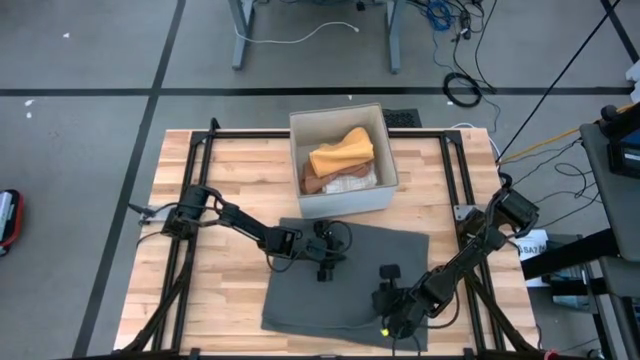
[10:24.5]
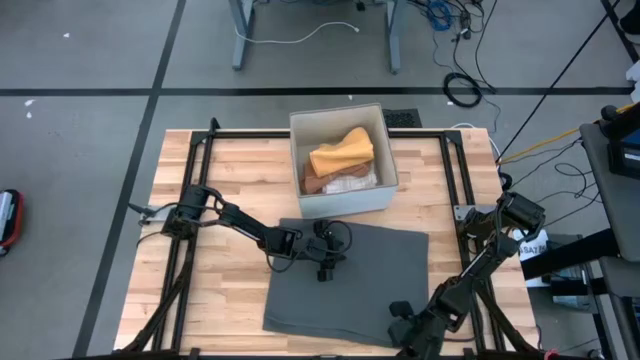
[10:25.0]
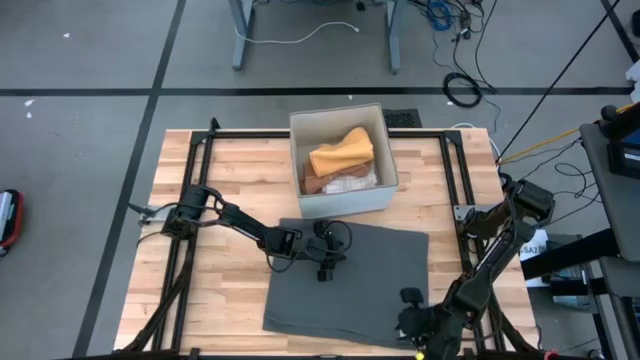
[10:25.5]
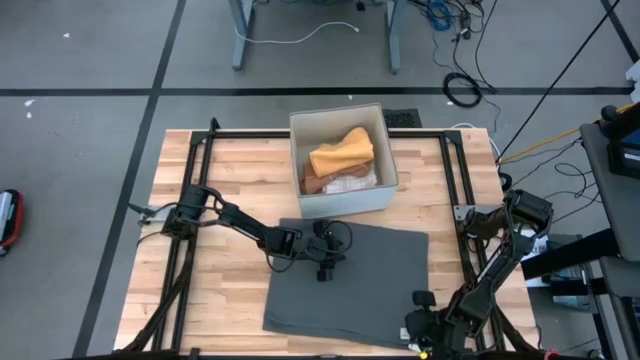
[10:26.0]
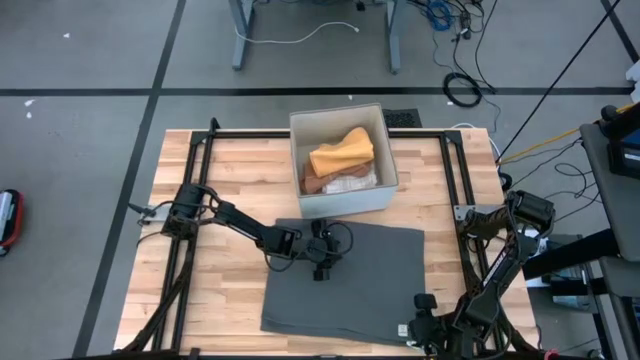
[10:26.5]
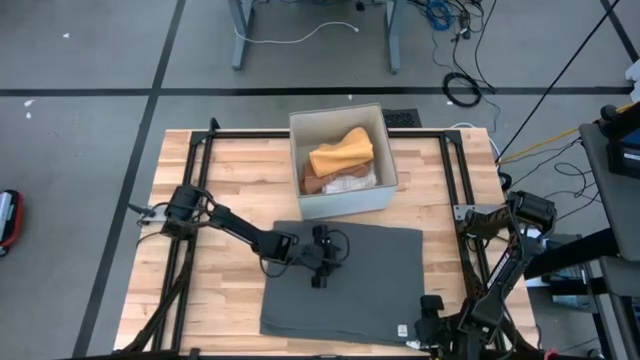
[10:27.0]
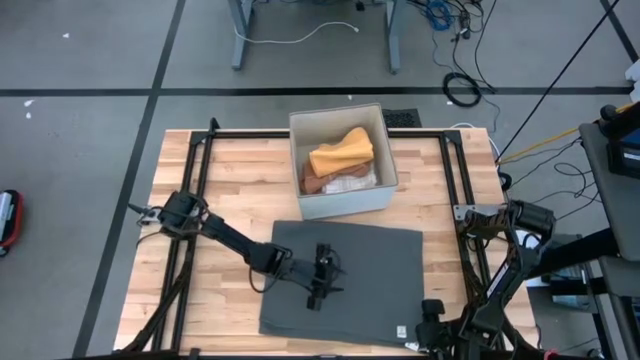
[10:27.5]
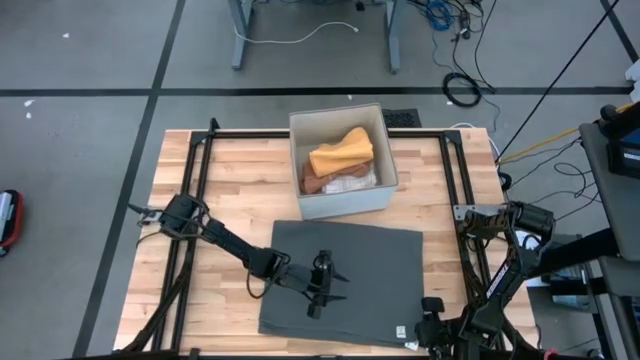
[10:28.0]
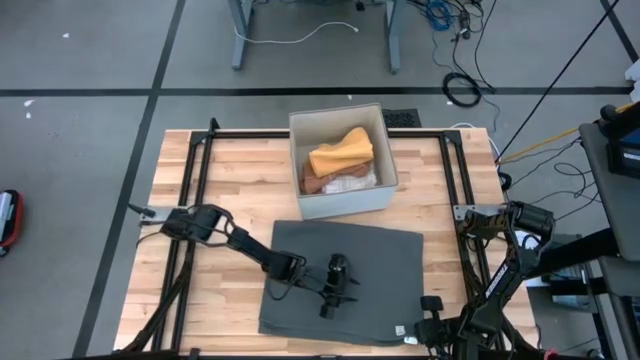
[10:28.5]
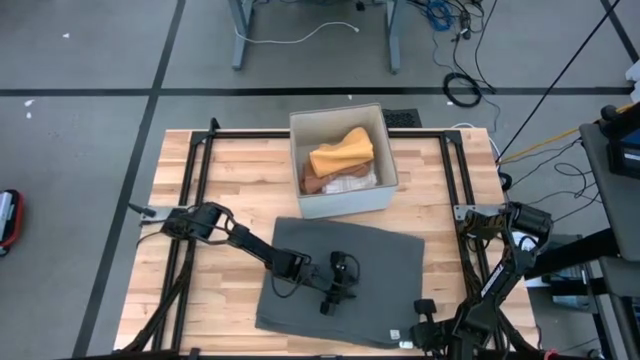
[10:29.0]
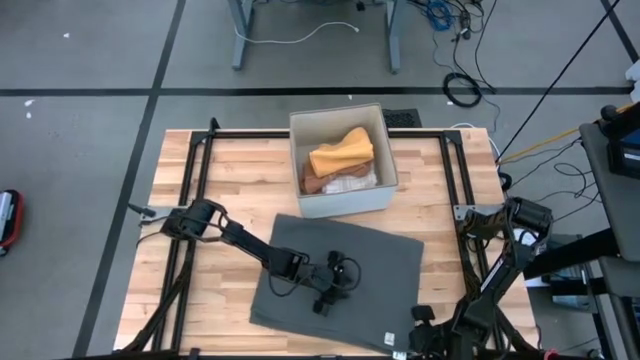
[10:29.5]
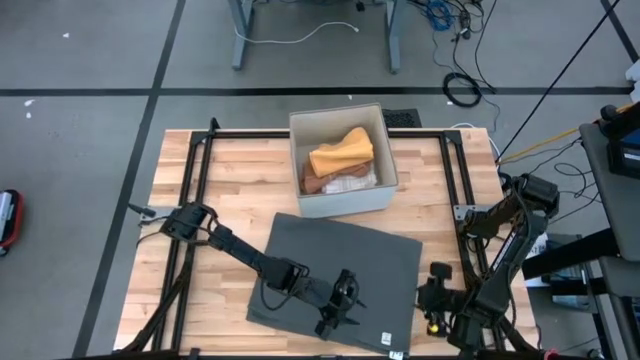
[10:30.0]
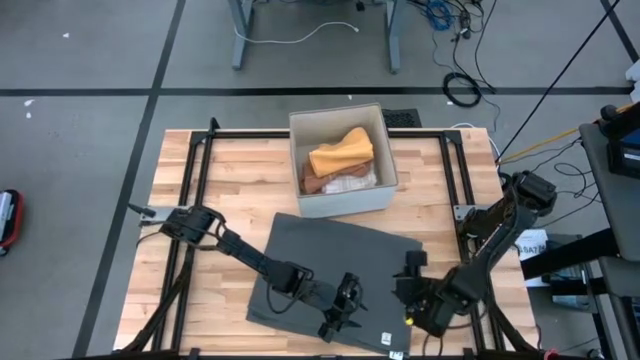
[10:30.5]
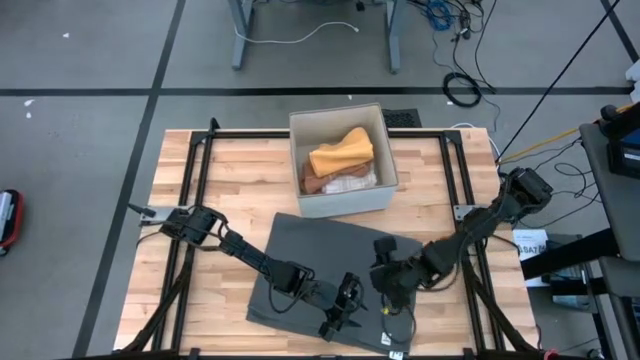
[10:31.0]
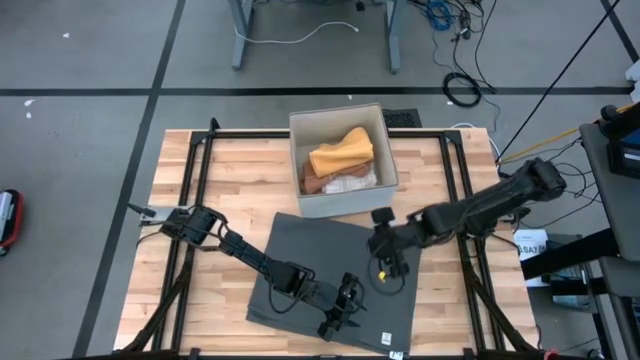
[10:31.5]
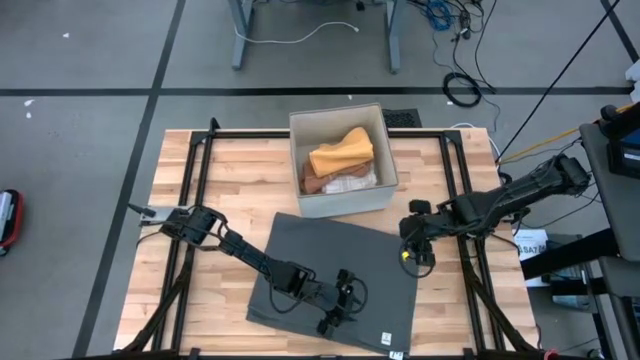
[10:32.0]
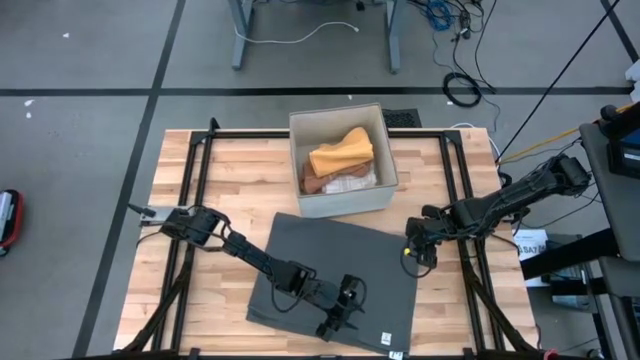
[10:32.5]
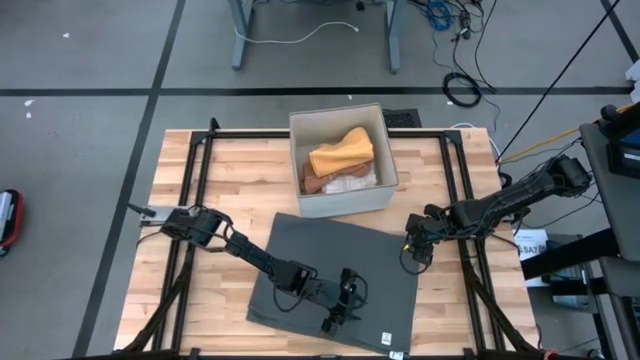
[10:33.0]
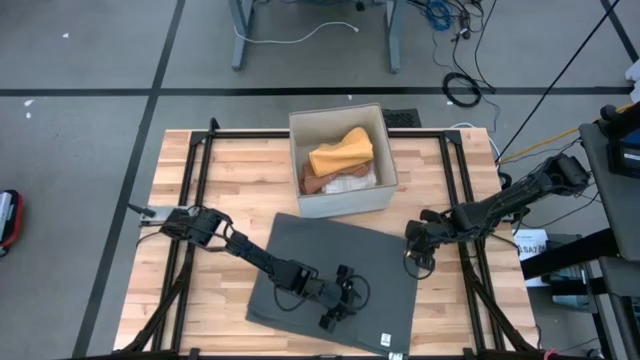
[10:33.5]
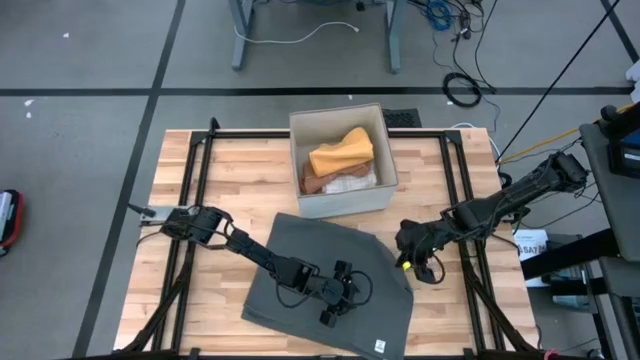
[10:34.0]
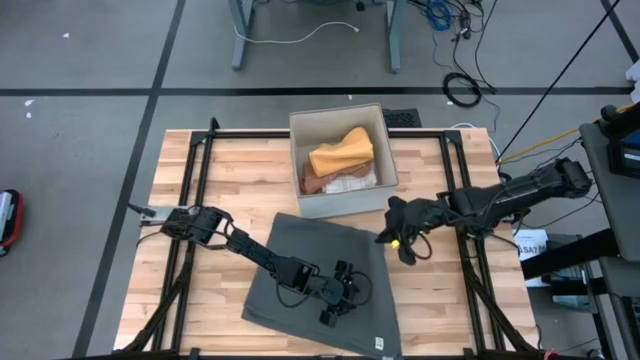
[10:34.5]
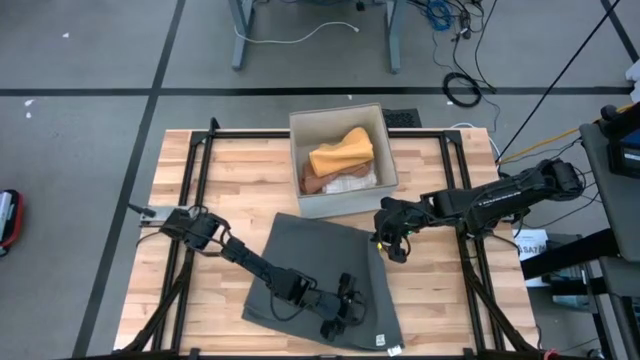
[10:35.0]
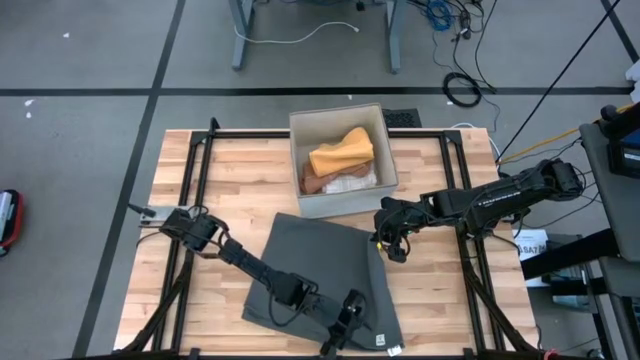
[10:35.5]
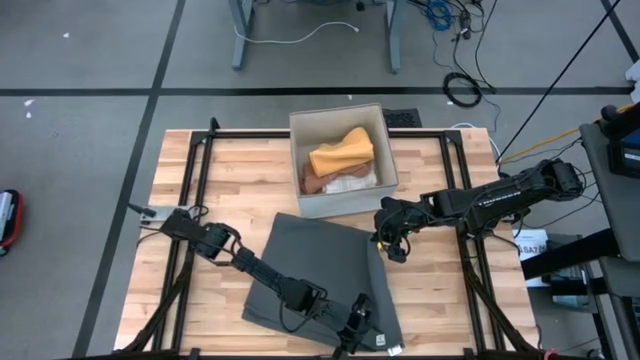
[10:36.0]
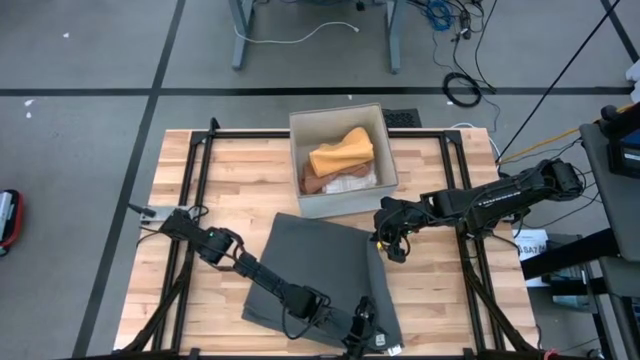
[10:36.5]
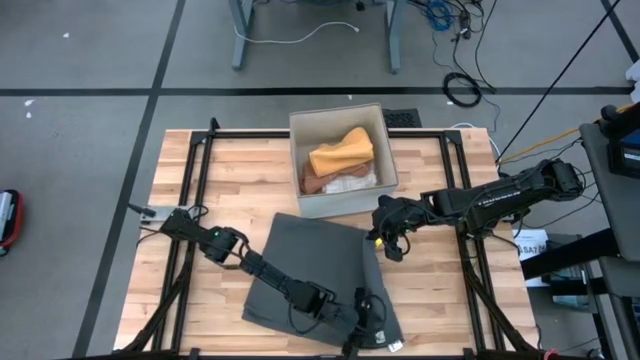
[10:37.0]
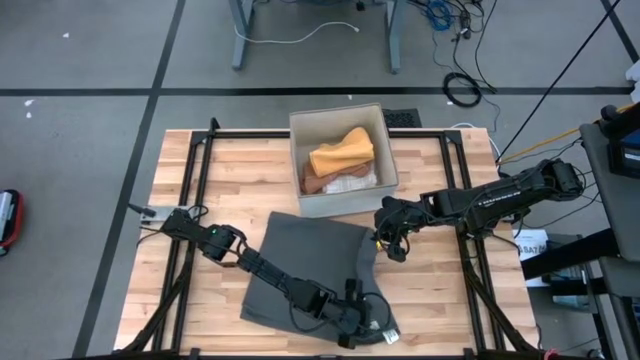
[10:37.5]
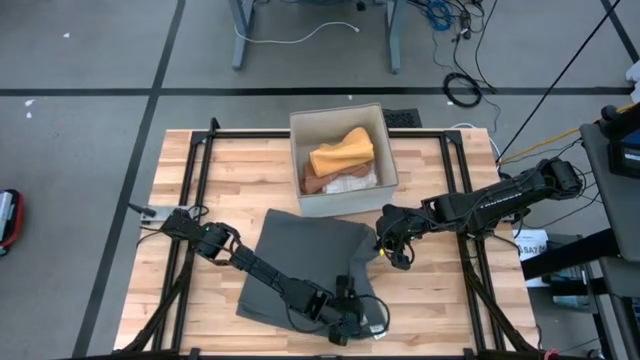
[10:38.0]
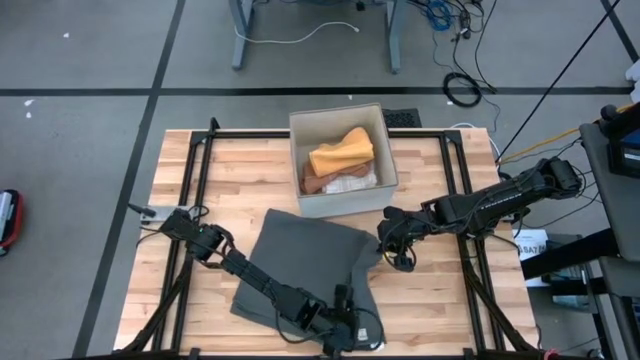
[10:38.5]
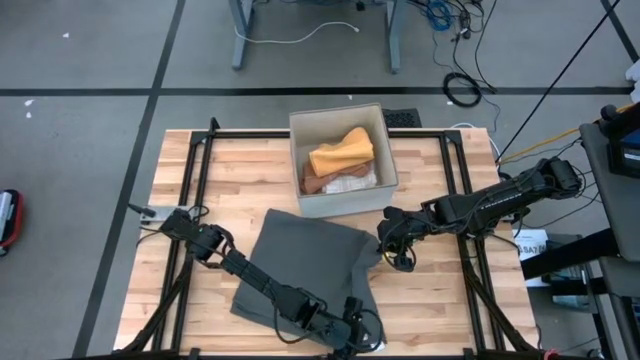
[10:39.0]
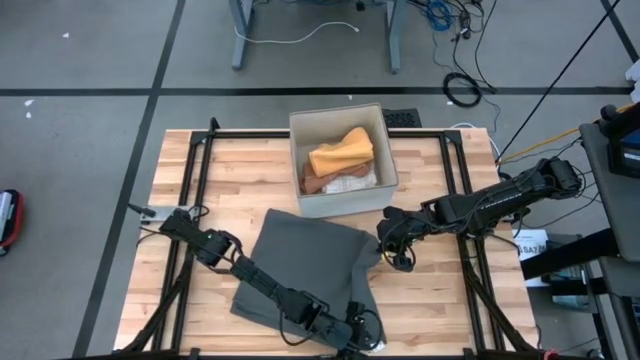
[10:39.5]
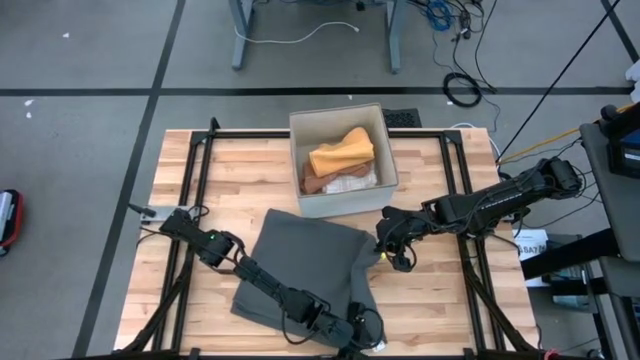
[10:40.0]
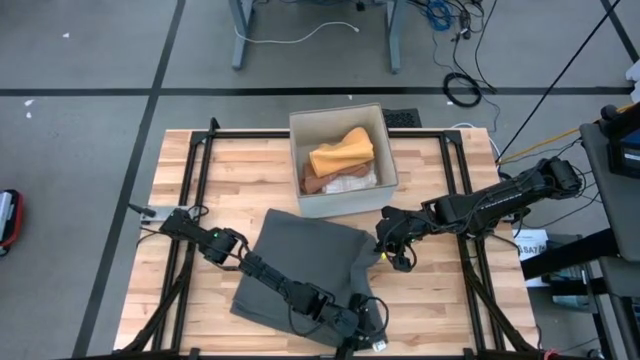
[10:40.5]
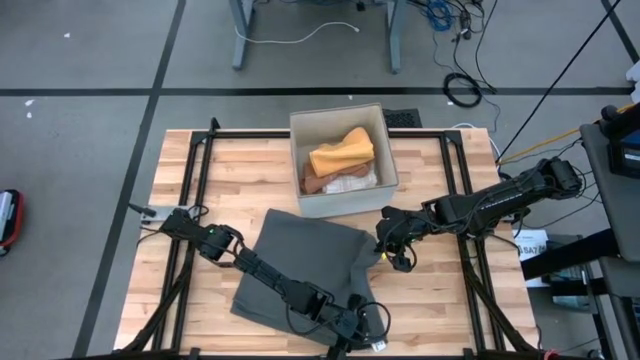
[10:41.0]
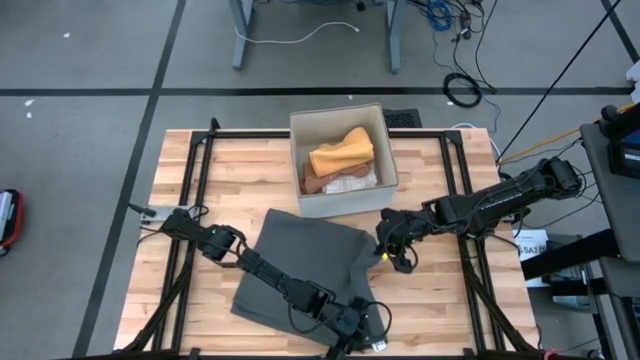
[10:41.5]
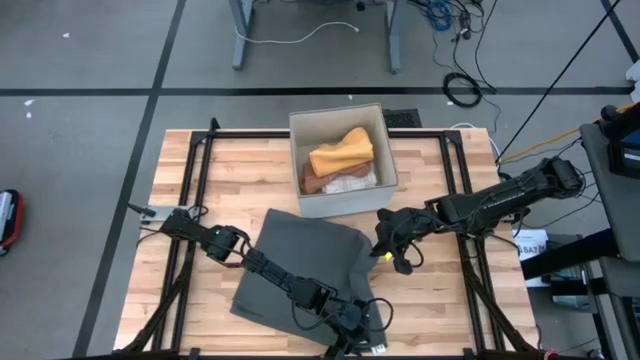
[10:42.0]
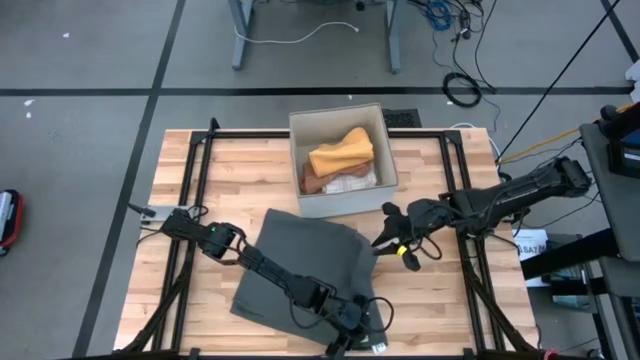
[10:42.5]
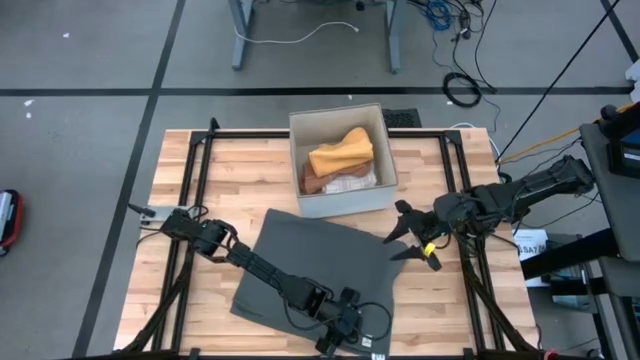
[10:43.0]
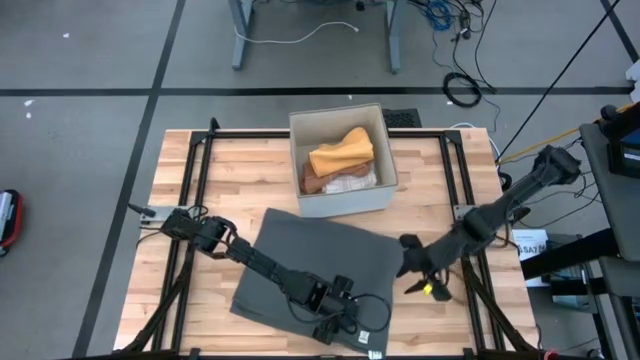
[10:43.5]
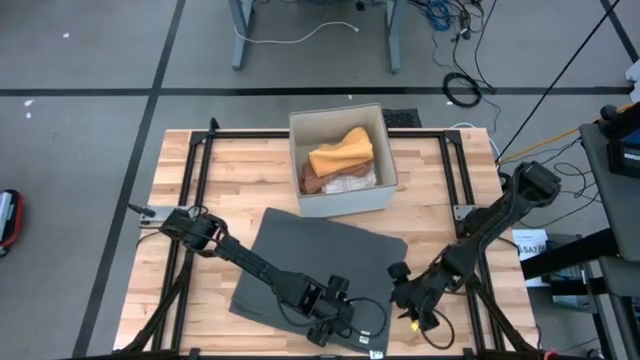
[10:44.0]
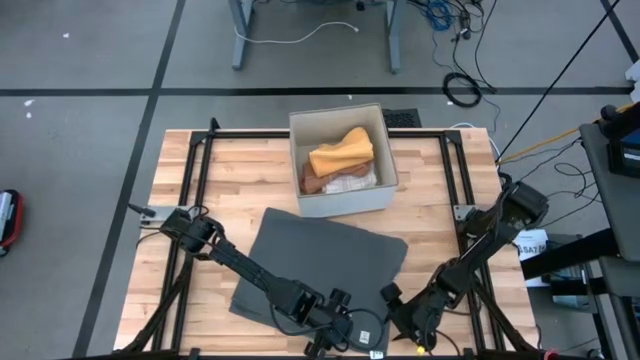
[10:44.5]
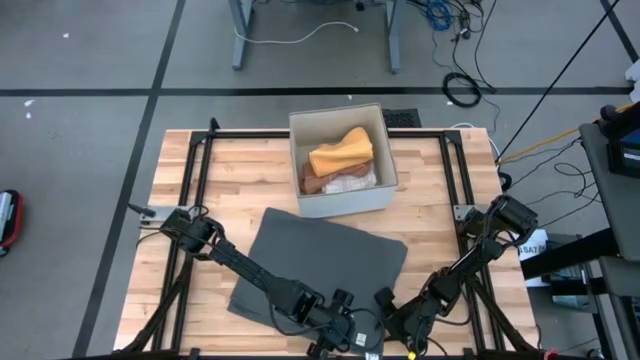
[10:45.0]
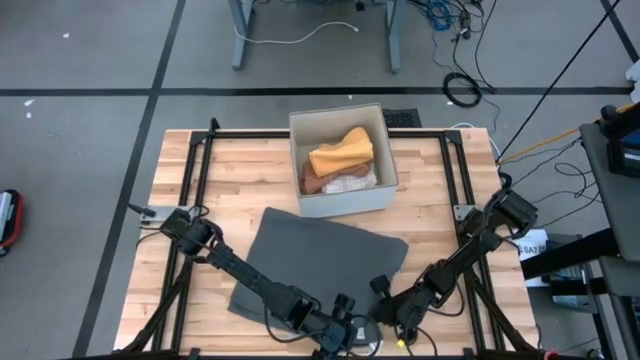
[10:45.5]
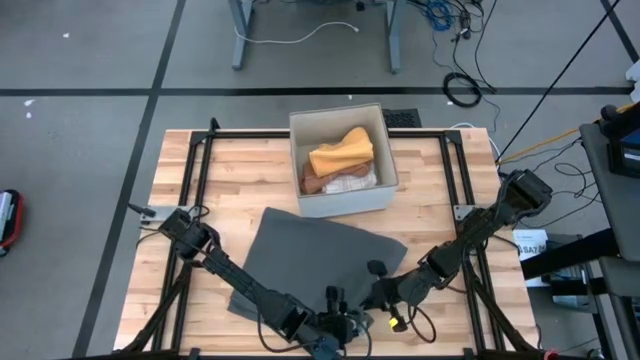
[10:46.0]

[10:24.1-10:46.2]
Task: Fold towel
Fold the orange towel
